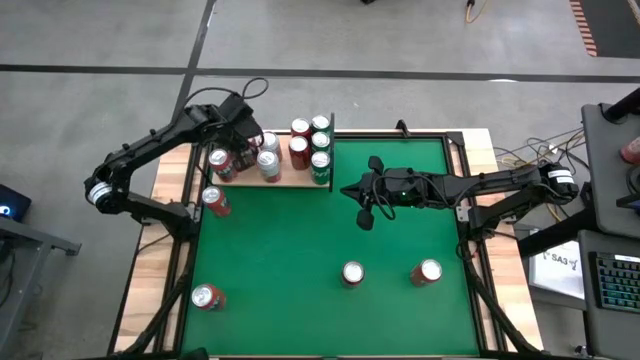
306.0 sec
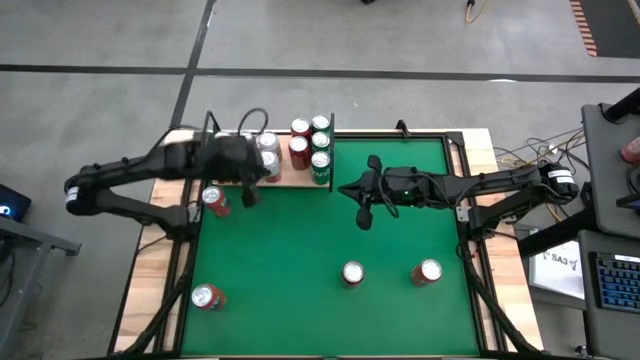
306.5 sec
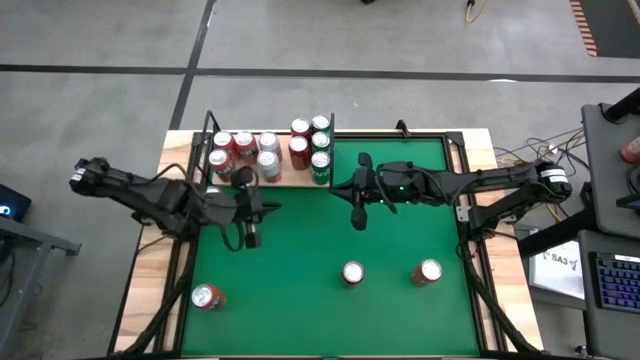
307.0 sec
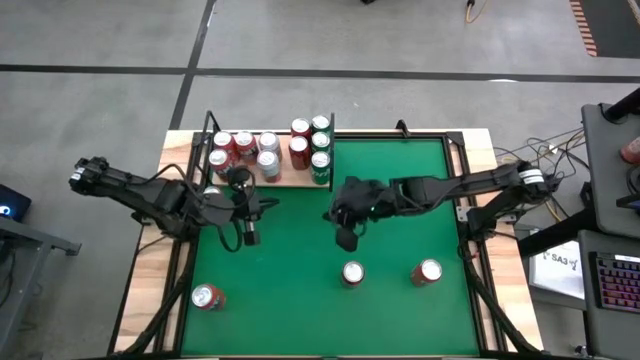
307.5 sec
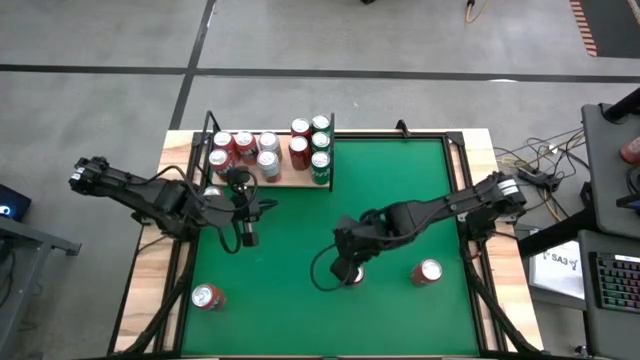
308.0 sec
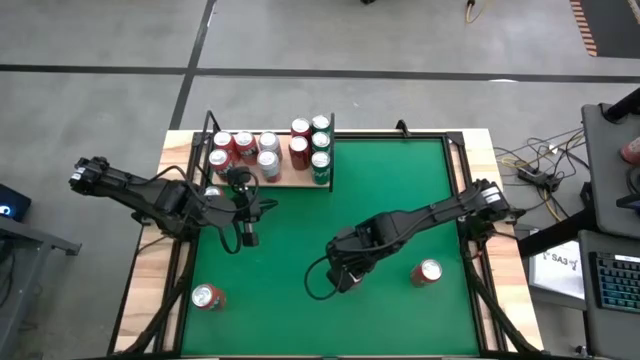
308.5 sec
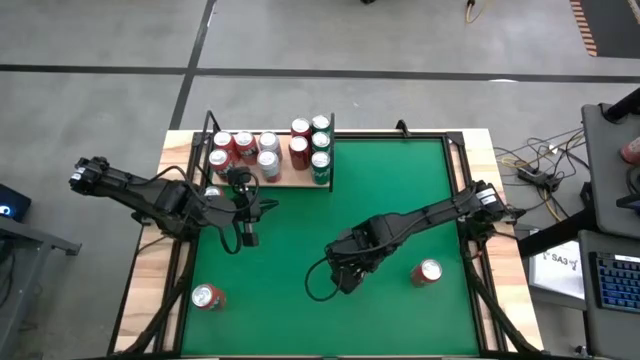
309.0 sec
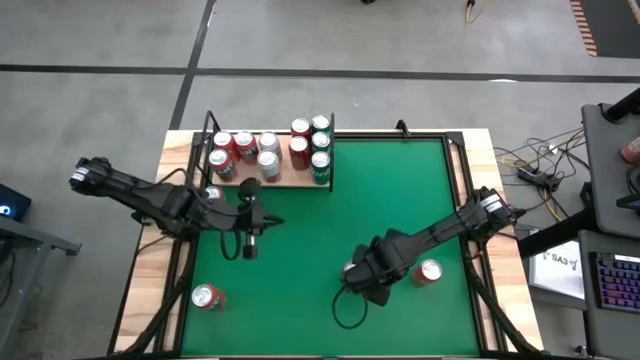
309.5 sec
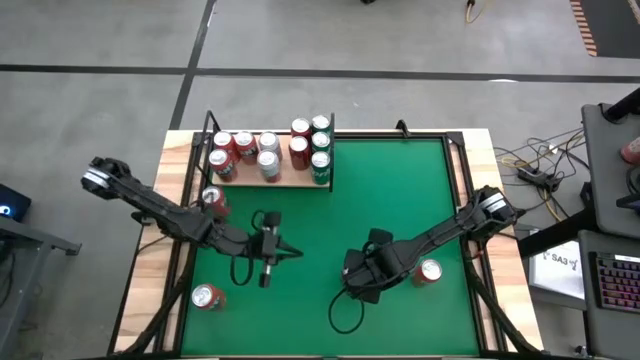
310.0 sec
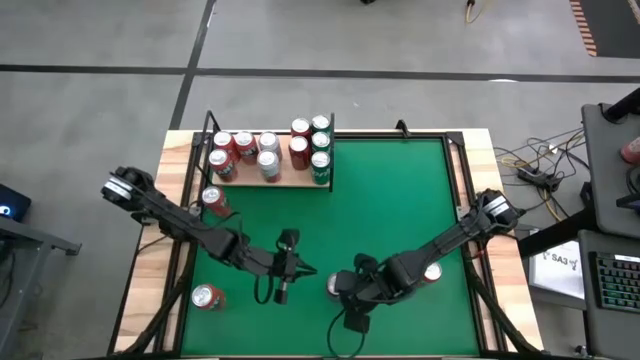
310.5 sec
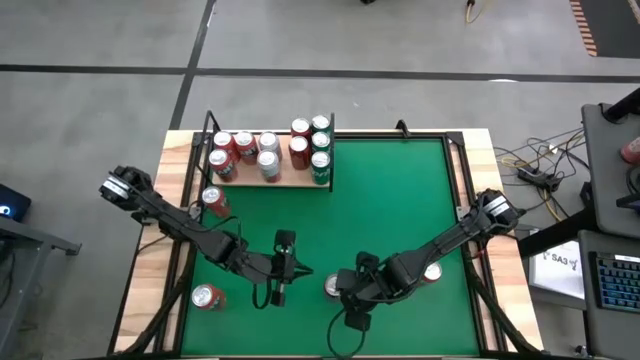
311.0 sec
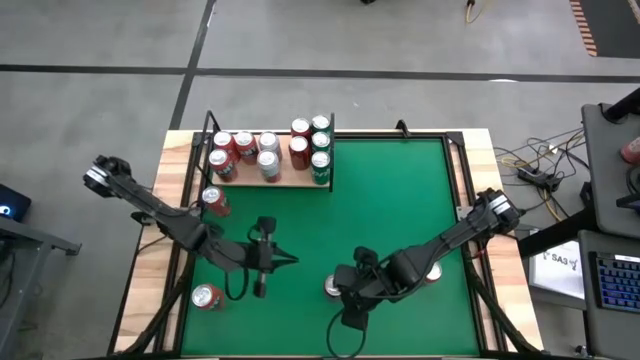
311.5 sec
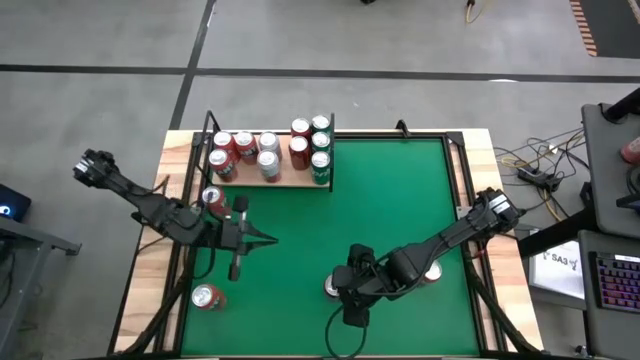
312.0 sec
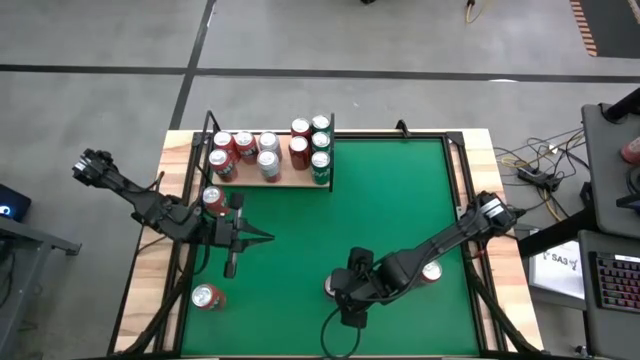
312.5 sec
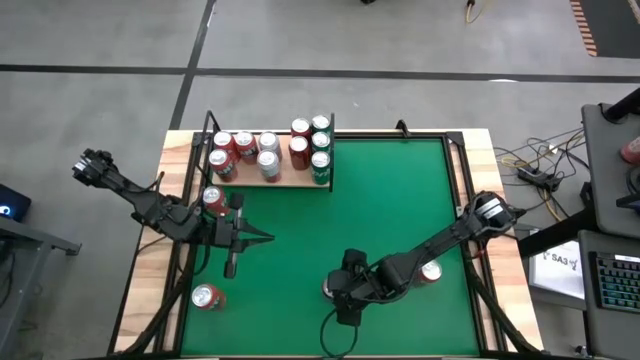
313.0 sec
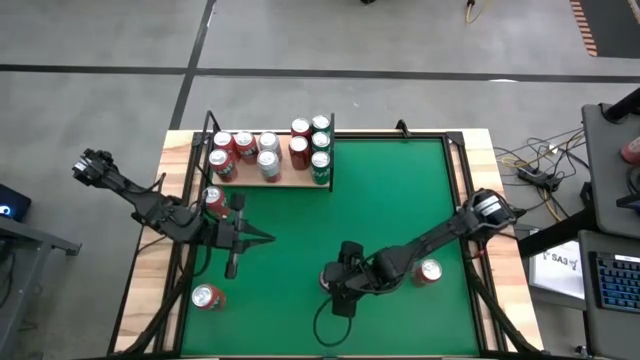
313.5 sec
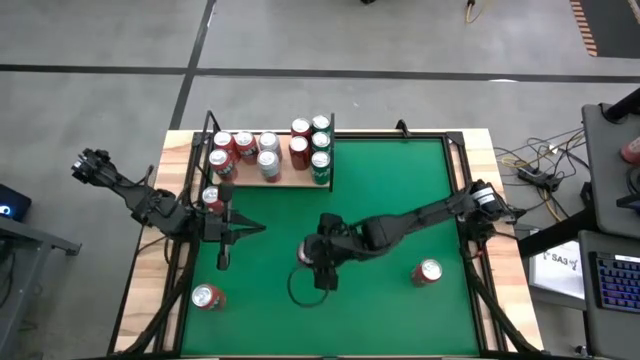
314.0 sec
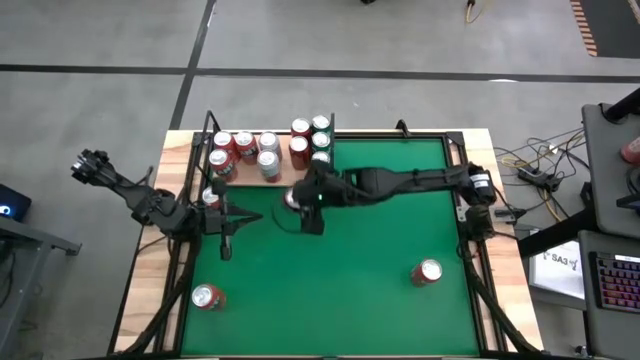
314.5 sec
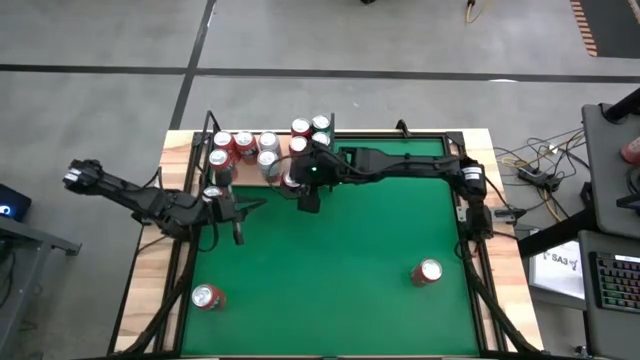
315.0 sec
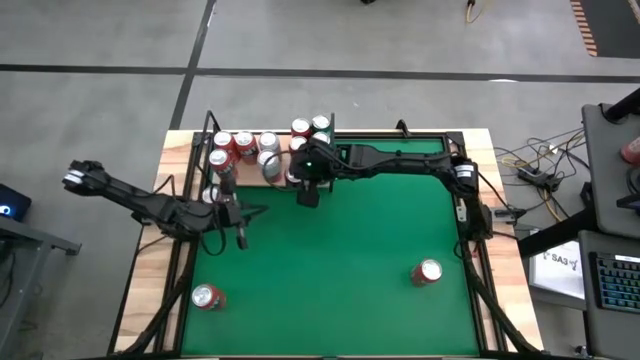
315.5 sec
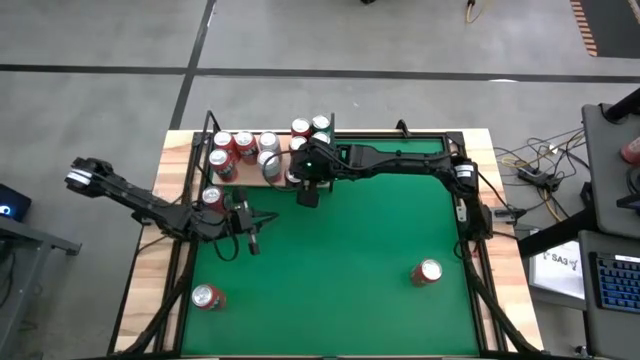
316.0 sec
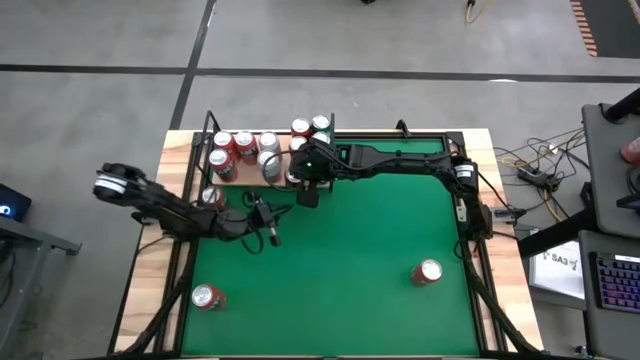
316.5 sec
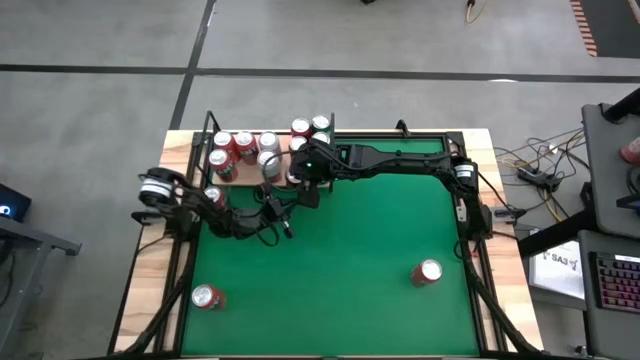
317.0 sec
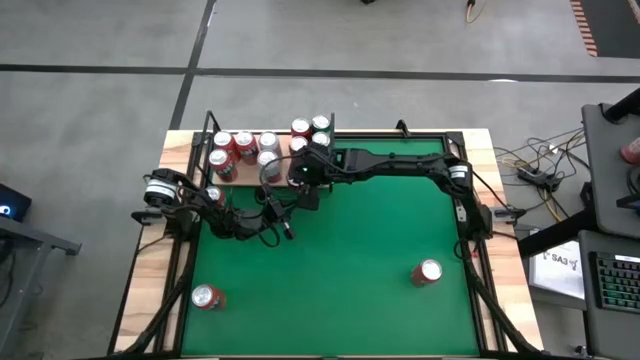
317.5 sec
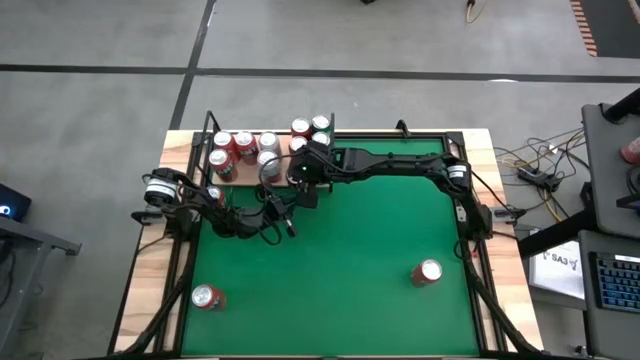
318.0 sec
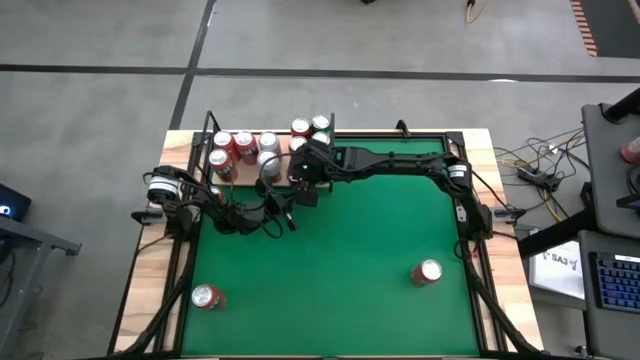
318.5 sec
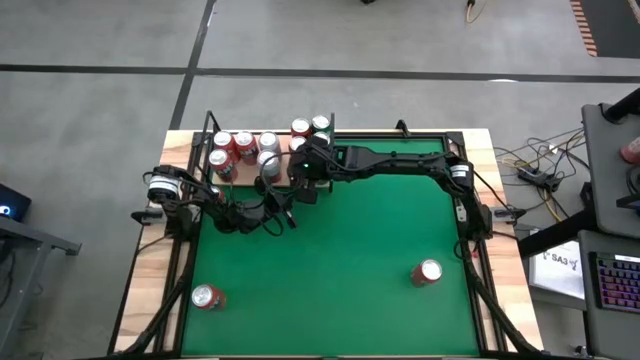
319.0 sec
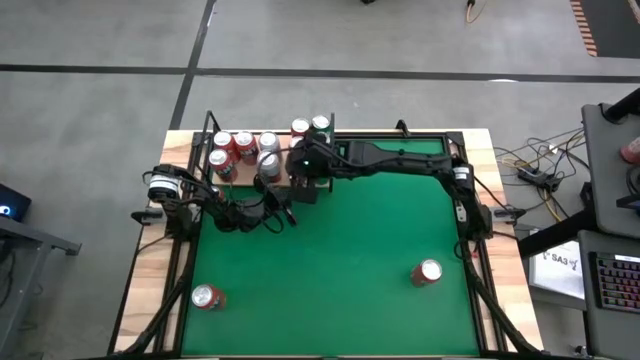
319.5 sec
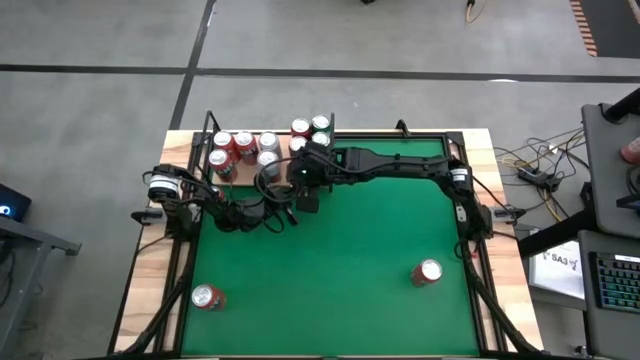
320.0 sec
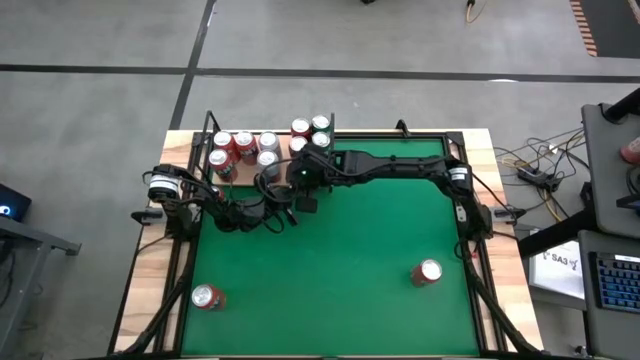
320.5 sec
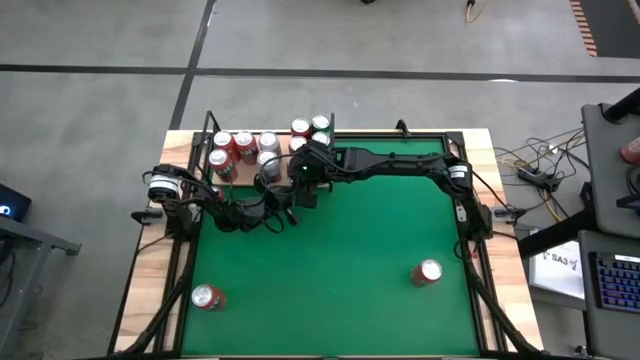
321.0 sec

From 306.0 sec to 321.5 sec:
Task: Place canned beverage on shelf
Put the red-black soda can on the shelf aligned with the other red-black soda can

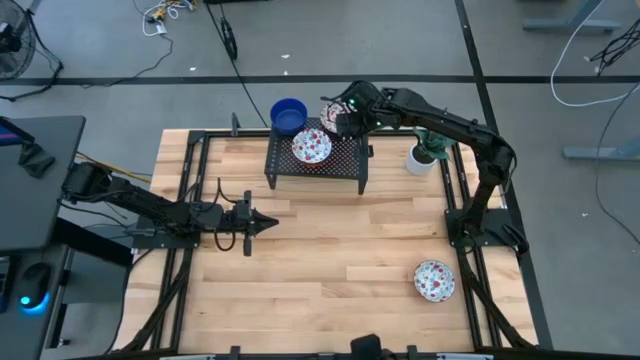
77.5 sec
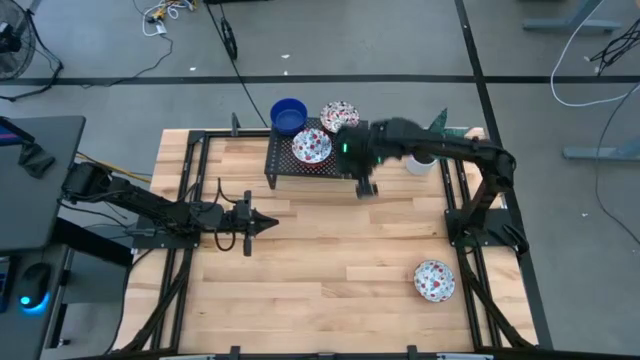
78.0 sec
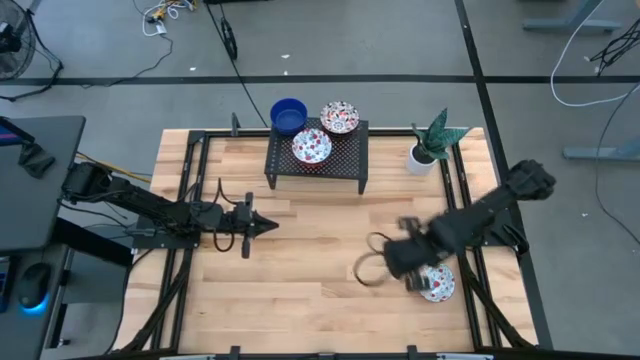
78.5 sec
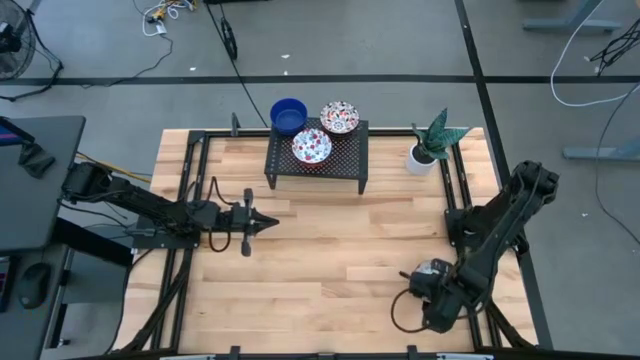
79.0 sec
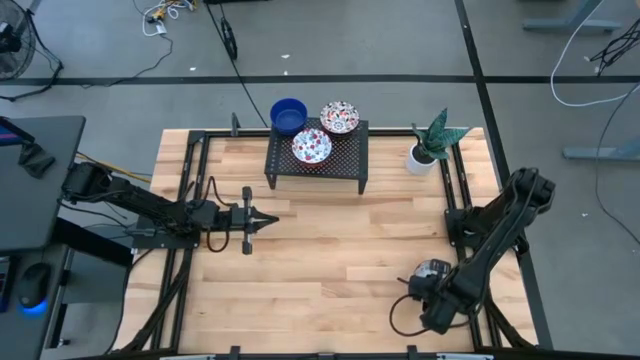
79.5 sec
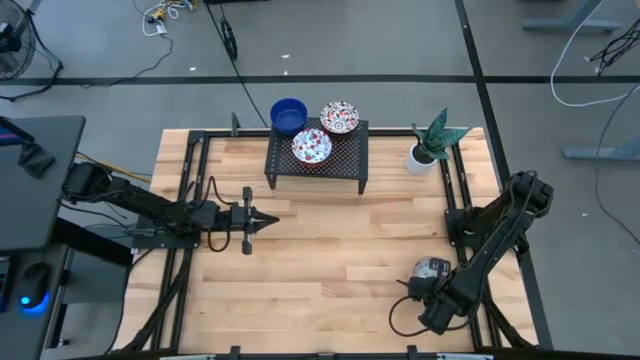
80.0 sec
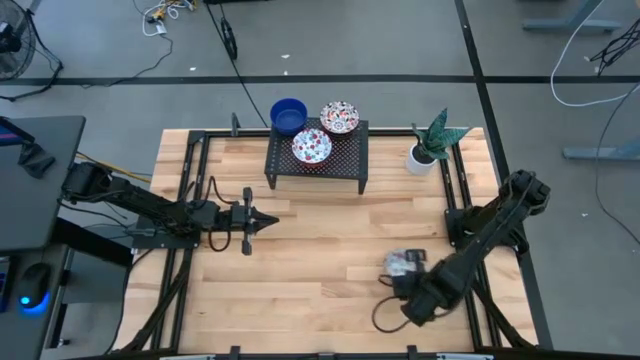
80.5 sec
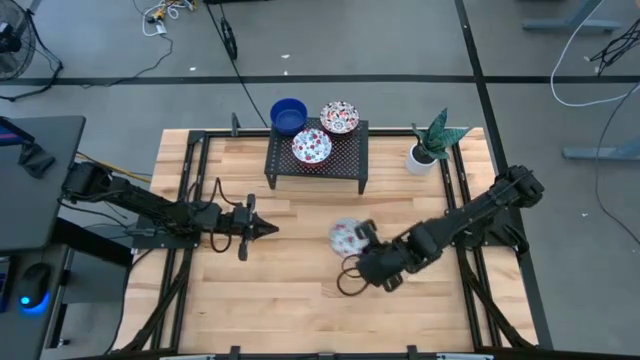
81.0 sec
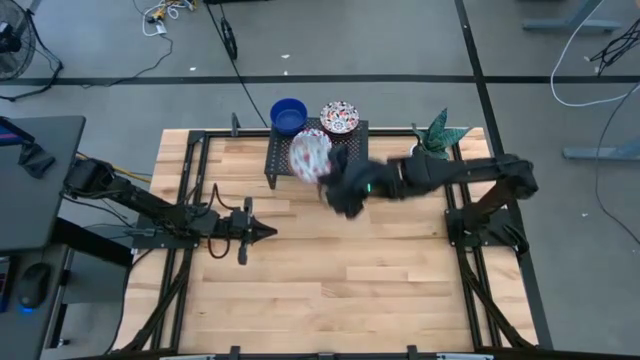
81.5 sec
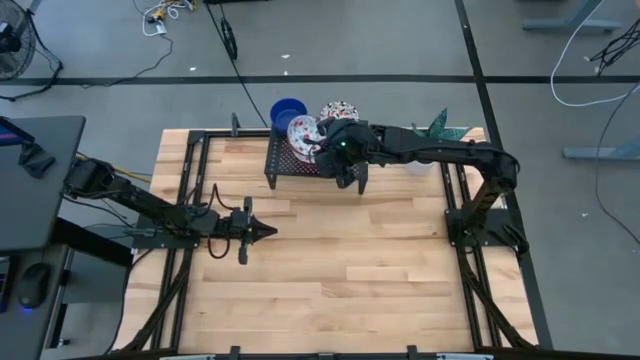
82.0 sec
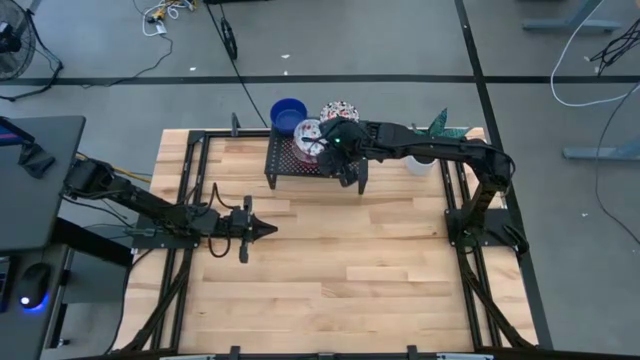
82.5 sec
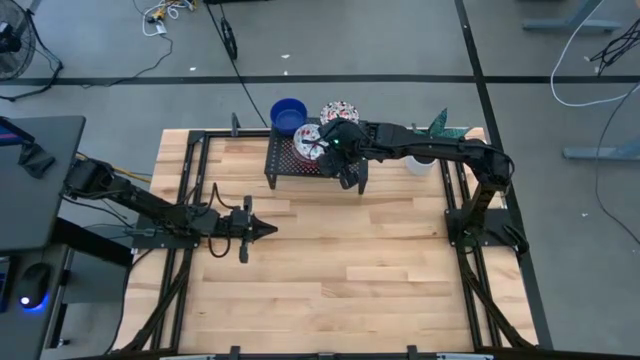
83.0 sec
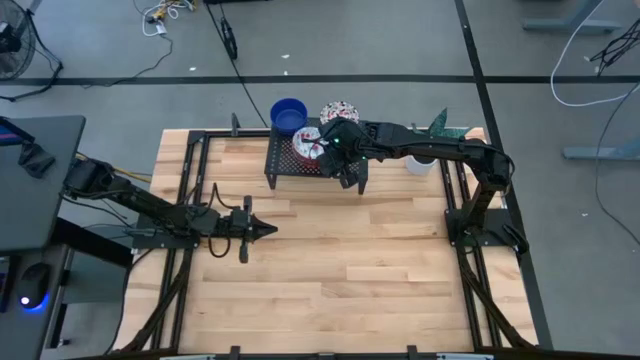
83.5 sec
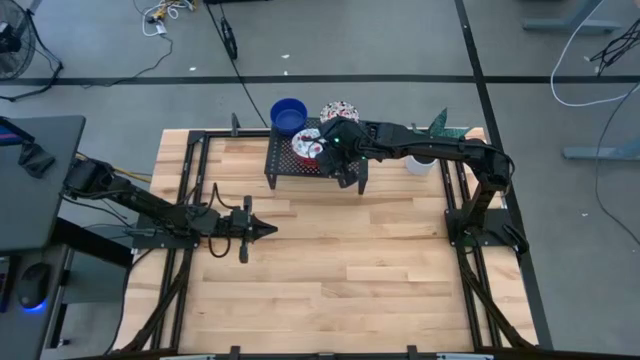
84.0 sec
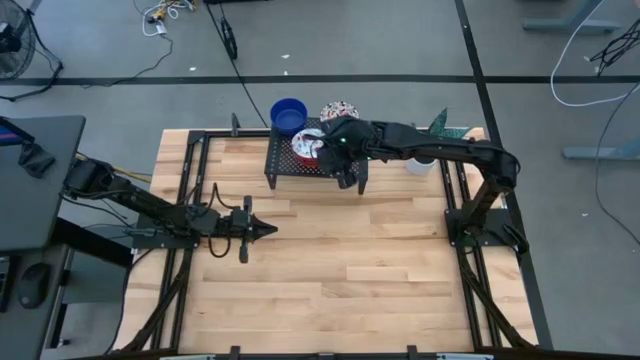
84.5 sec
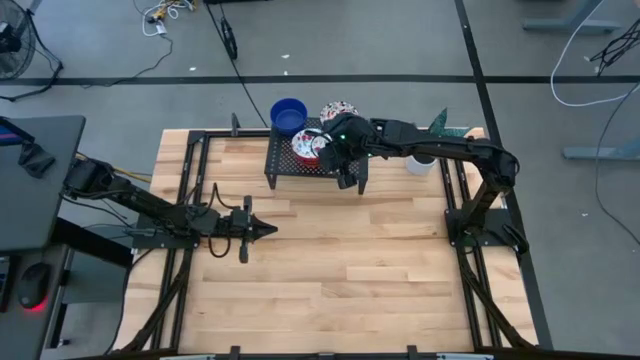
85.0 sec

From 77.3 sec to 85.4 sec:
Task: Pick & Place Mini bowls
Stack the red bowl on top of the other red bowls on the shelf
